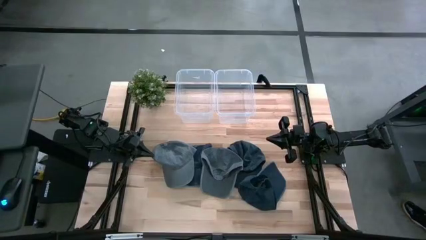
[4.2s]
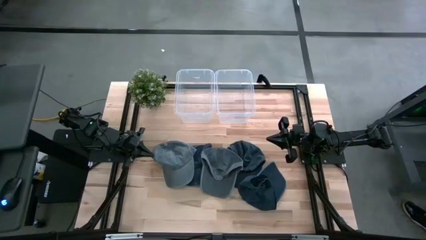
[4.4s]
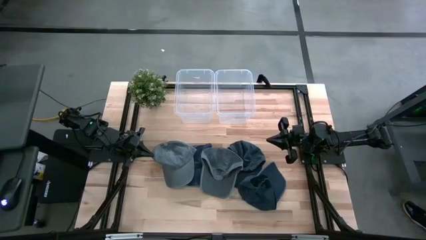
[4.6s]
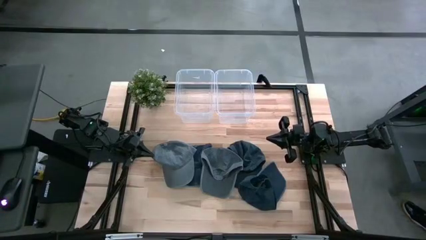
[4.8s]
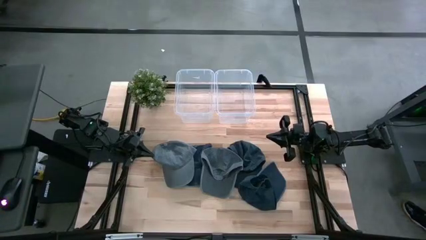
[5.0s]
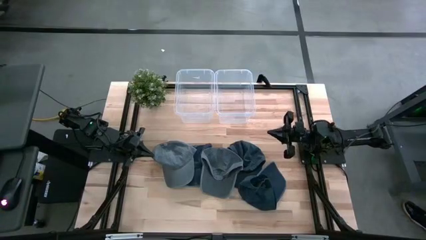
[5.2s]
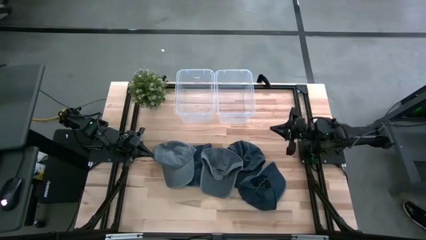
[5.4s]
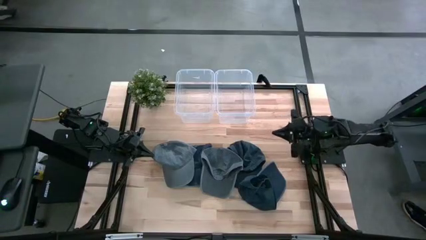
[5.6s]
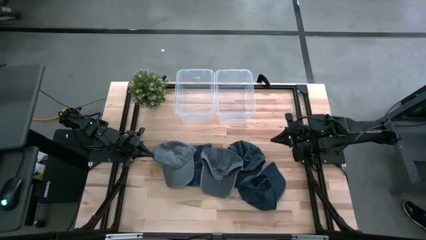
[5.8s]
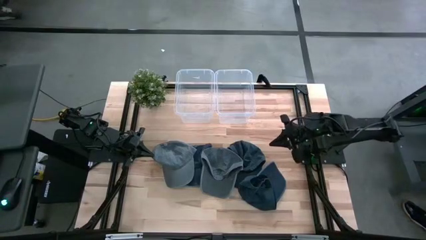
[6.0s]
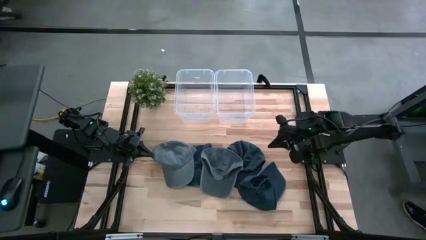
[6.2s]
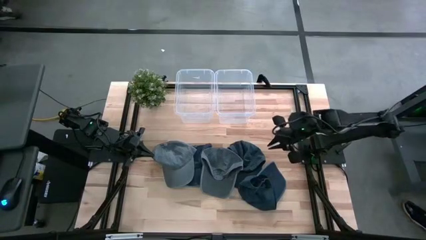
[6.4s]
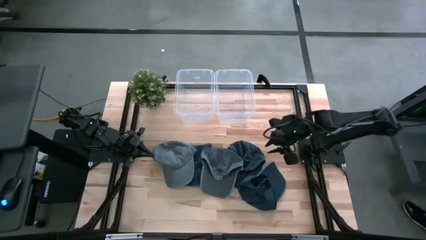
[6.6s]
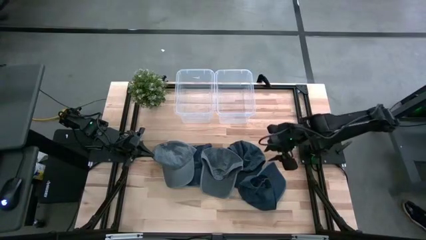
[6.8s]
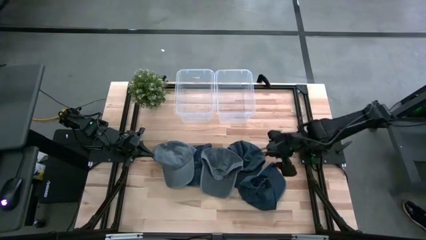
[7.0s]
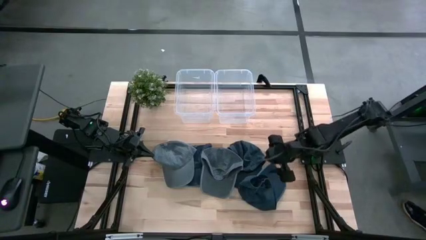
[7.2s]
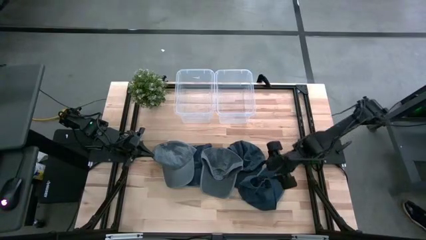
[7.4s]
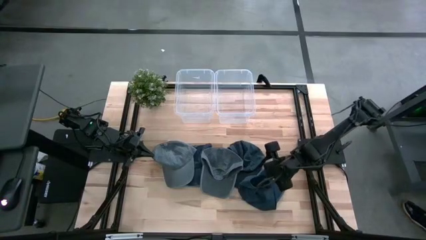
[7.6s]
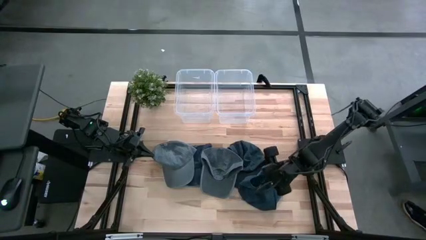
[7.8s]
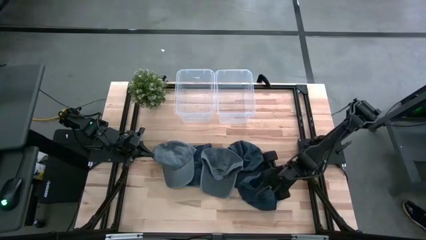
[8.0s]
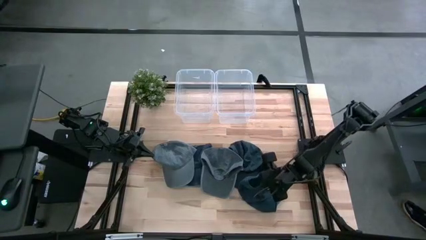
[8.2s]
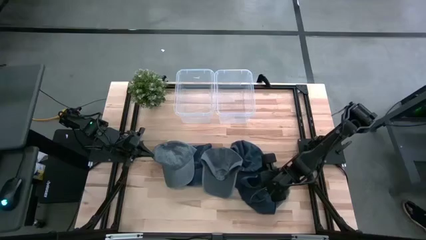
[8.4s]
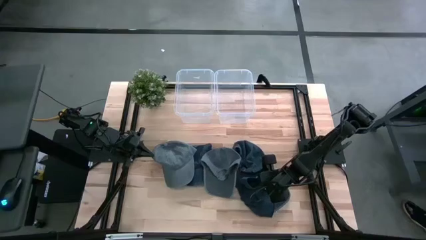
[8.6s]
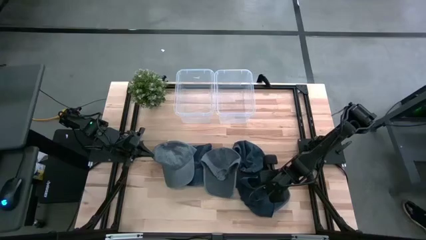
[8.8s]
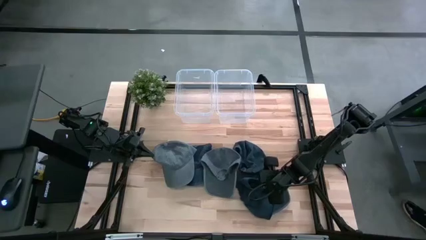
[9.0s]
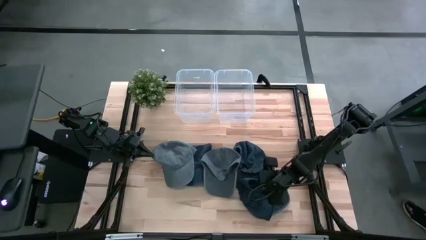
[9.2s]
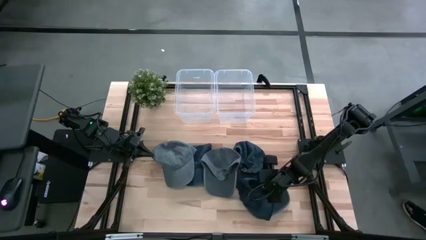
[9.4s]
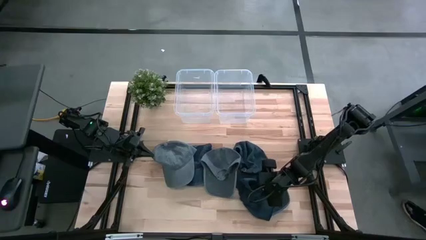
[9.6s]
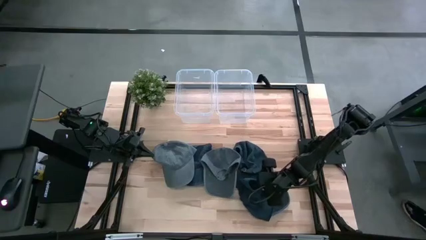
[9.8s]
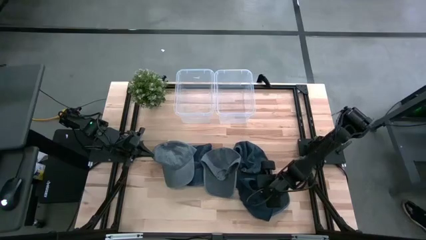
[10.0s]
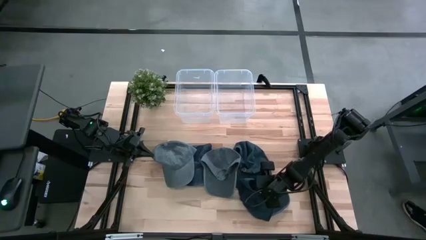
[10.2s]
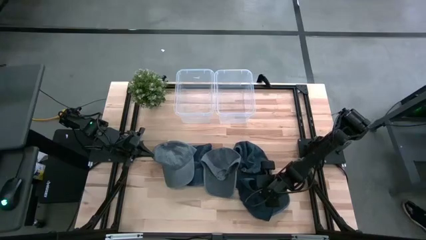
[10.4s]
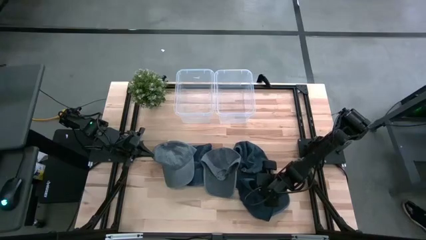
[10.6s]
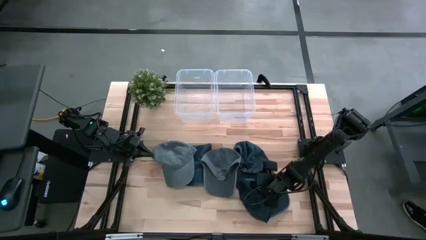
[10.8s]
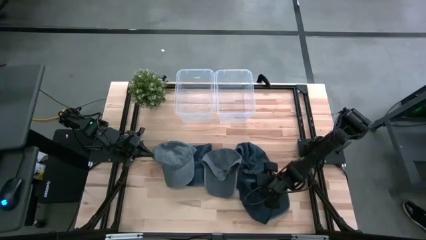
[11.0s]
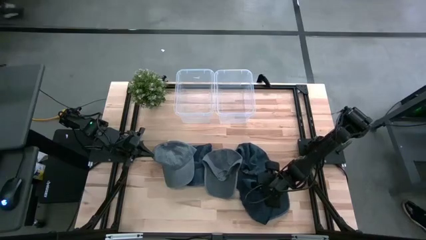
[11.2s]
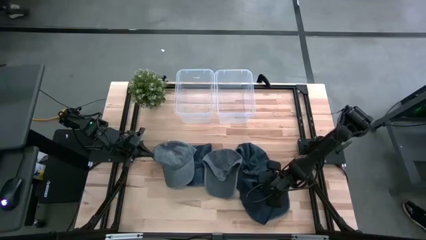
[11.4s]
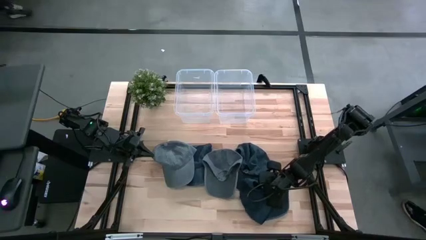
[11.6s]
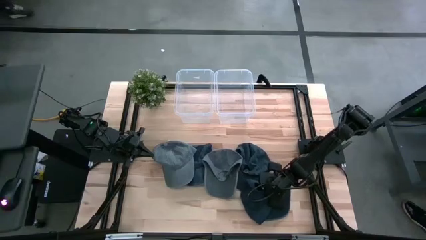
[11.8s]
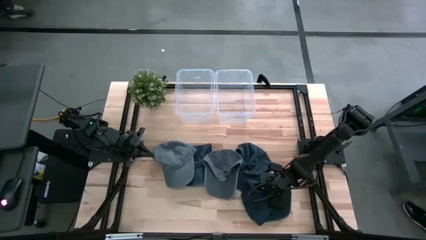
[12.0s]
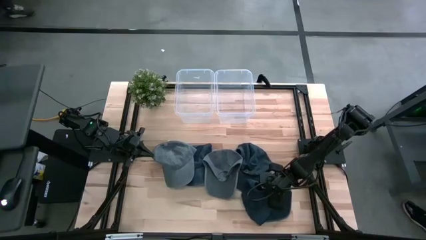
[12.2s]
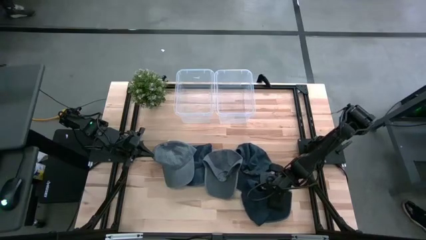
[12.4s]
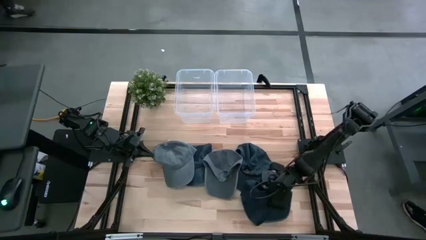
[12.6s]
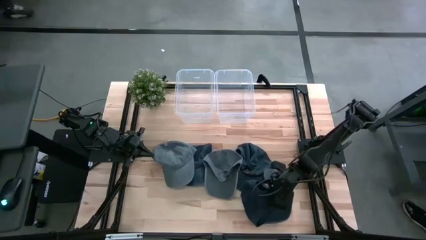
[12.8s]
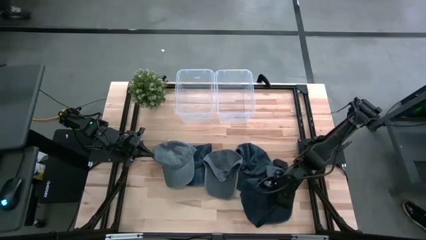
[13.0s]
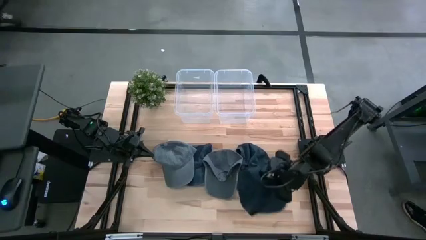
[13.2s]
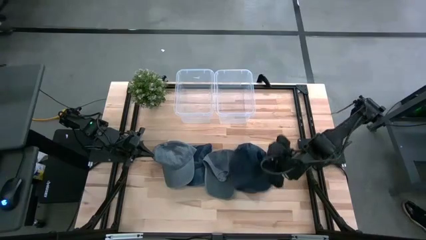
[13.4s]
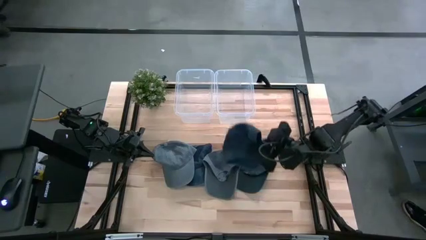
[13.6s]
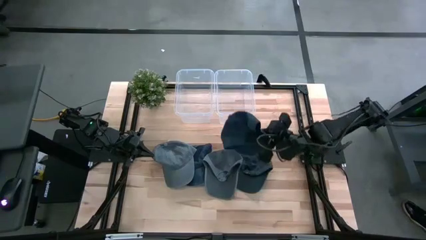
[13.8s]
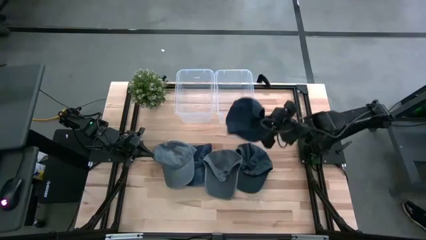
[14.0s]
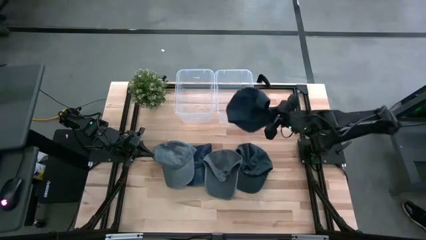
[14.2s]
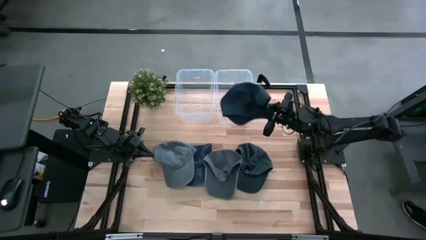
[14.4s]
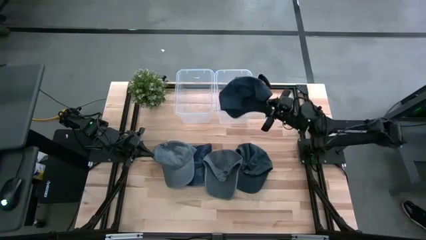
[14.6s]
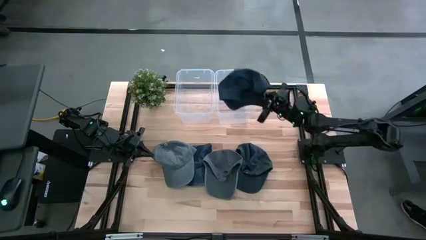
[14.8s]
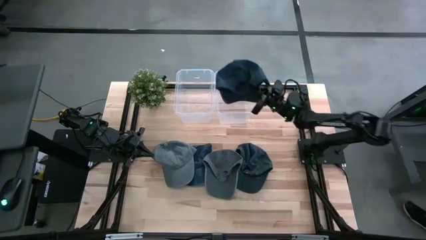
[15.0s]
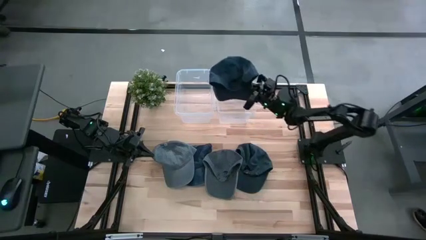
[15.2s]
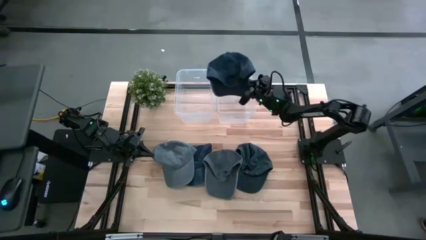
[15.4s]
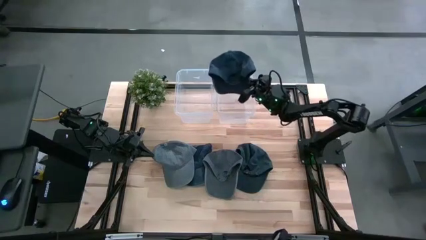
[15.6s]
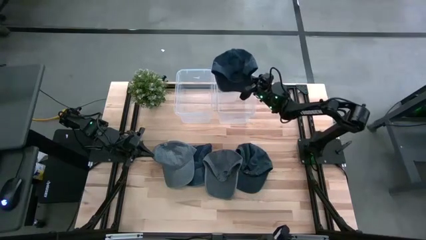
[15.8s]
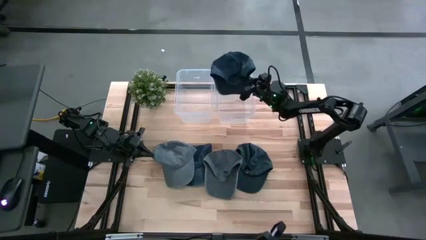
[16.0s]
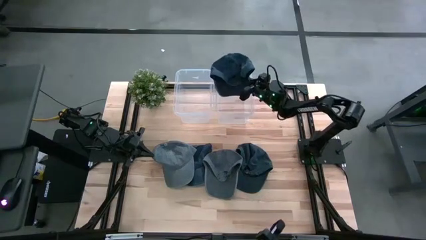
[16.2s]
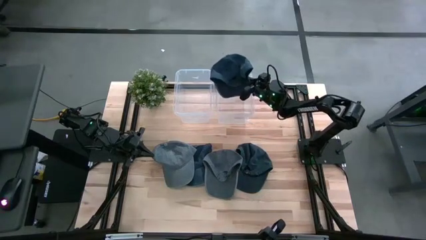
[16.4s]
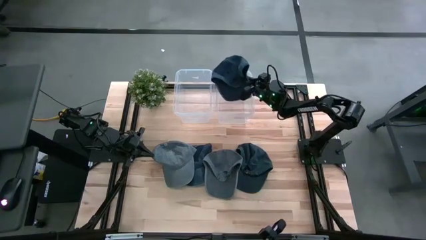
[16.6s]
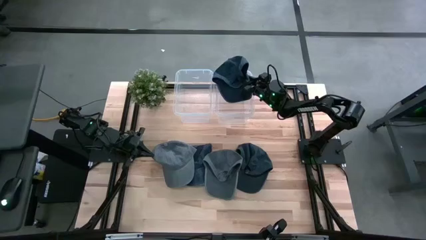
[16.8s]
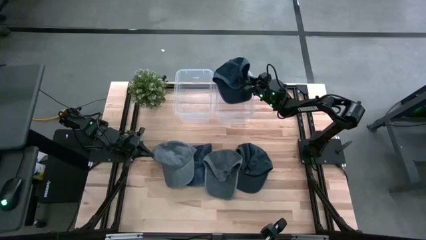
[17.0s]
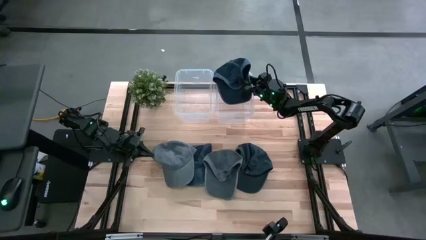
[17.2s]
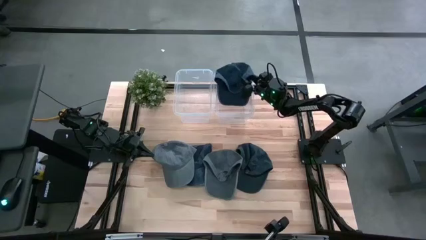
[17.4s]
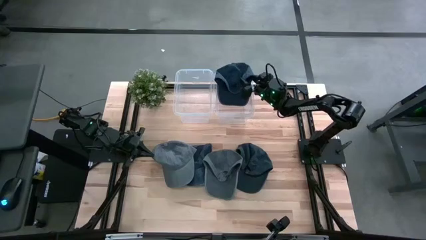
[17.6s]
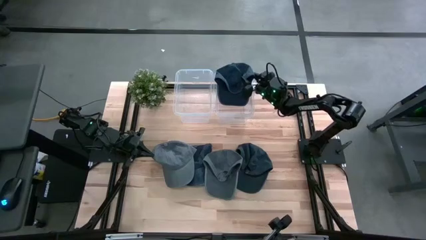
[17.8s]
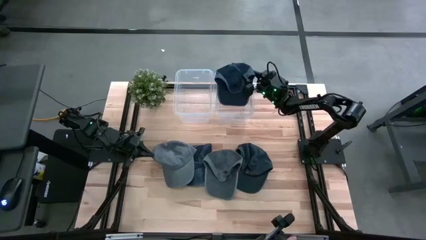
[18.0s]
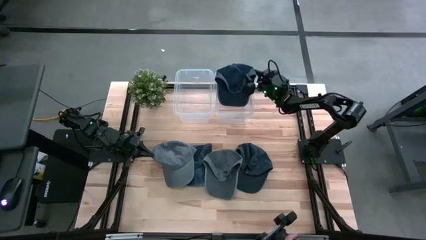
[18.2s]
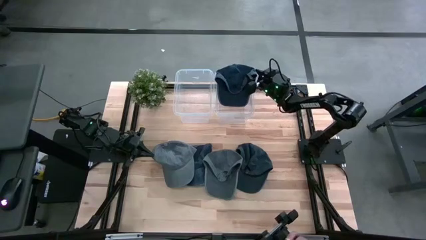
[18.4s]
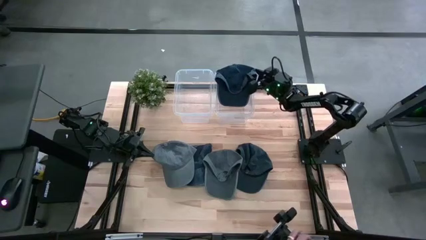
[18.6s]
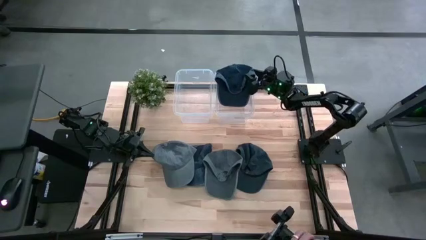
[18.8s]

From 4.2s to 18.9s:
Task: Pick & Place hat
Put the right blue cap into the right transparent bin

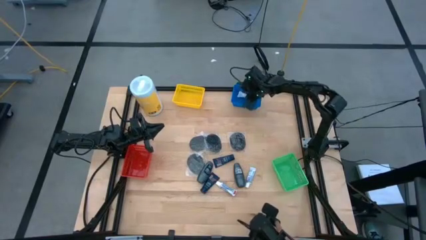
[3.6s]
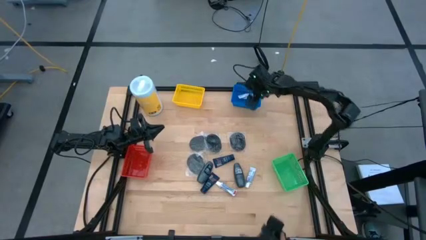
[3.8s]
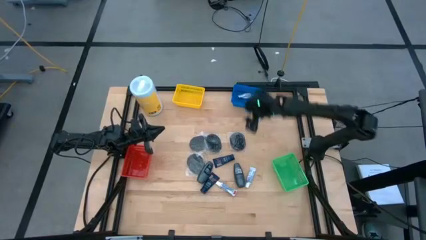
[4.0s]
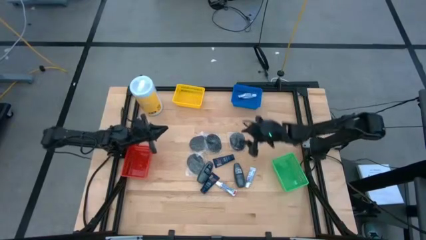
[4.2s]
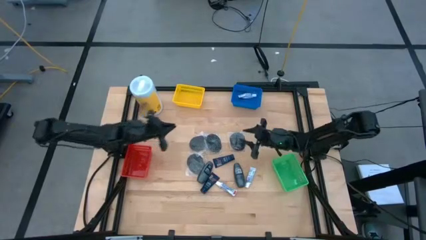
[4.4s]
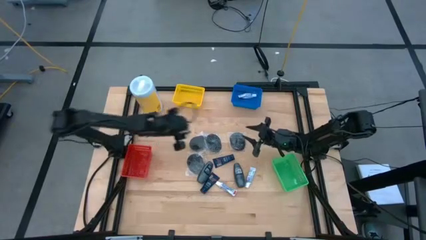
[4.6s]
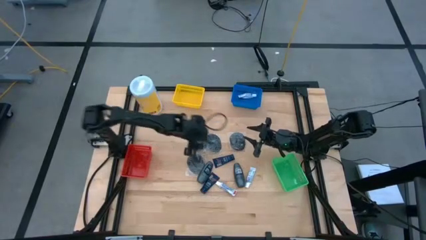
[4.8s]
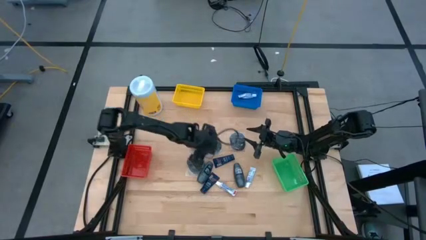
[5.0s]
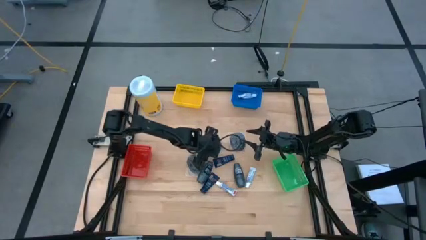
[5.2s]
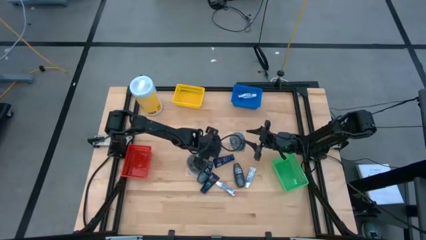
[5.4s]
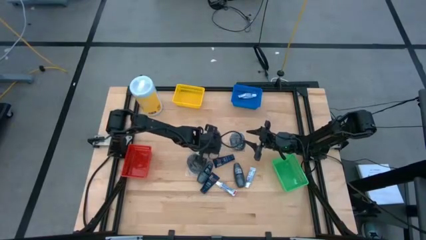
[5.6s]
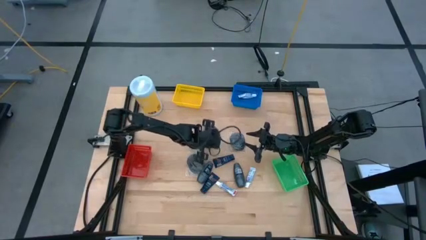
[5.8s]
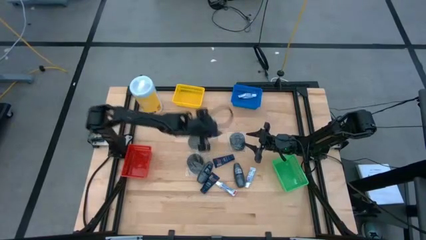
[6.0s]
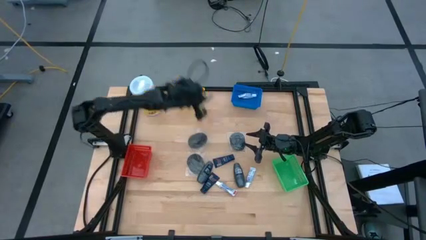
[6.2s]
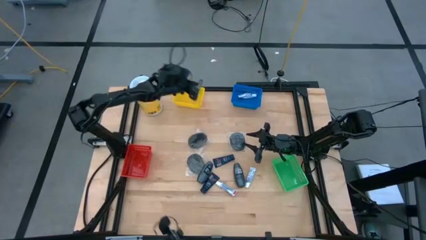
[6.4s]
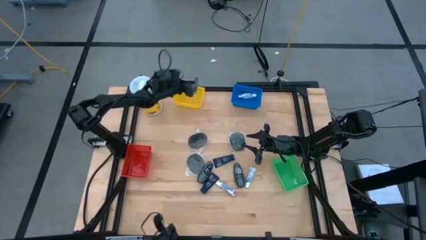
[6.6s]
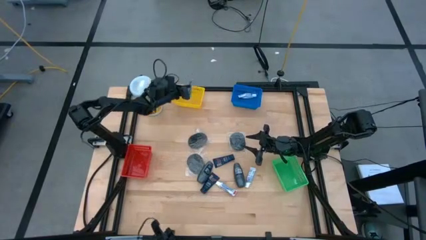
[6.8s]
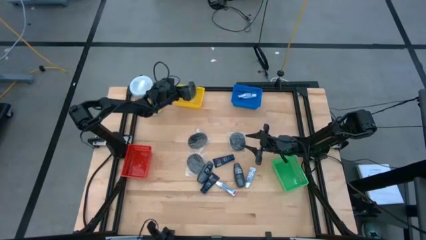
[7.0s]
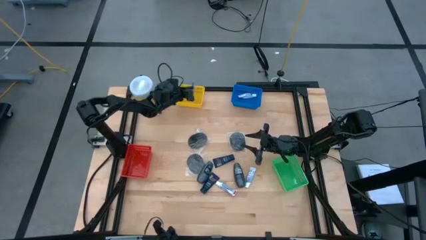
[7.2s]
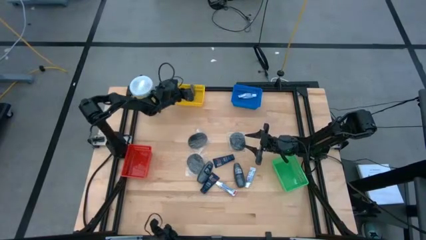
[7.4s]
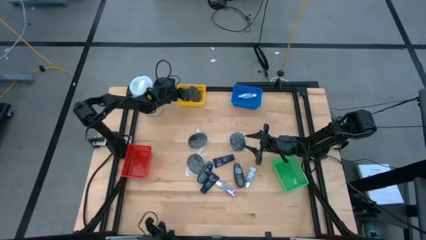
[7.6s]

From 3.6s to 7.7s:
Task: Pick & Place Travel size toiletries
Put the black hairbrush into the yellow bin
